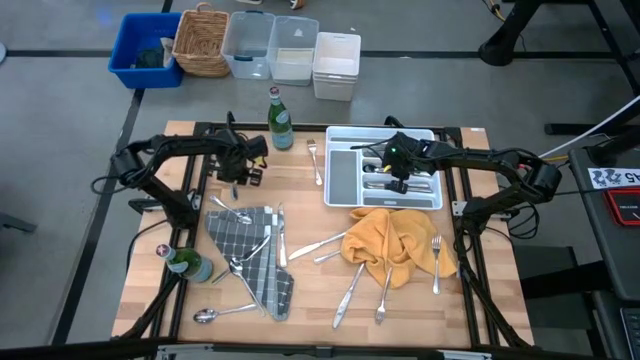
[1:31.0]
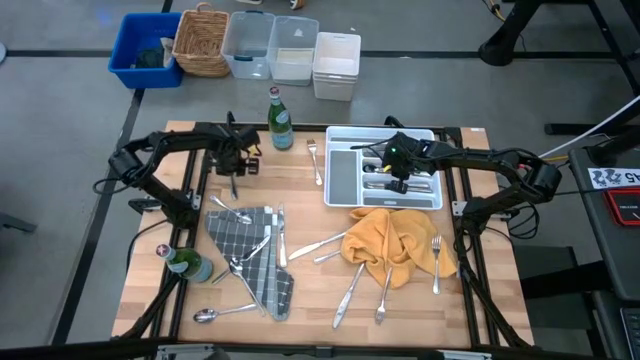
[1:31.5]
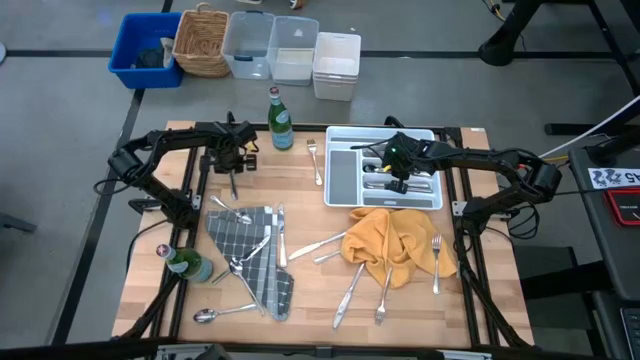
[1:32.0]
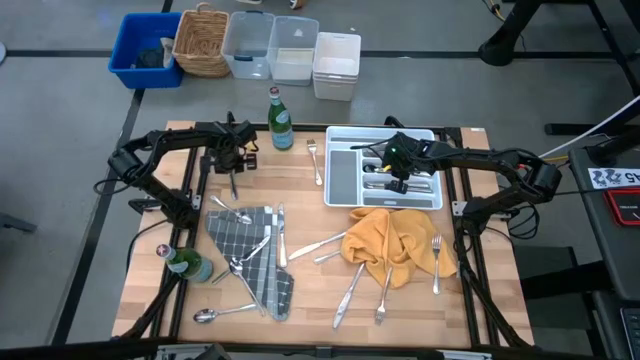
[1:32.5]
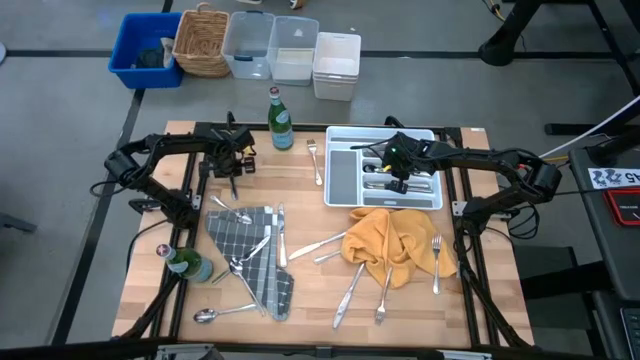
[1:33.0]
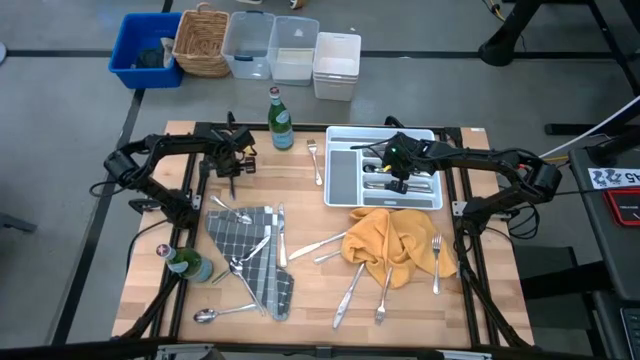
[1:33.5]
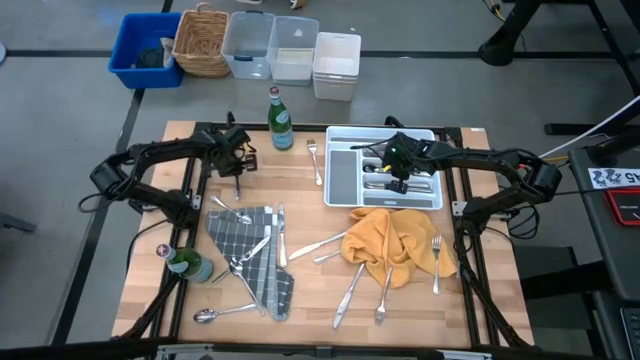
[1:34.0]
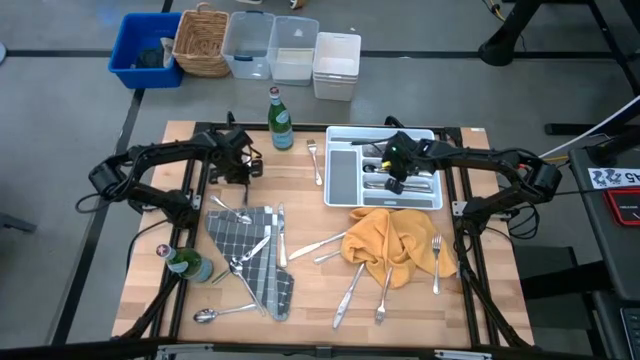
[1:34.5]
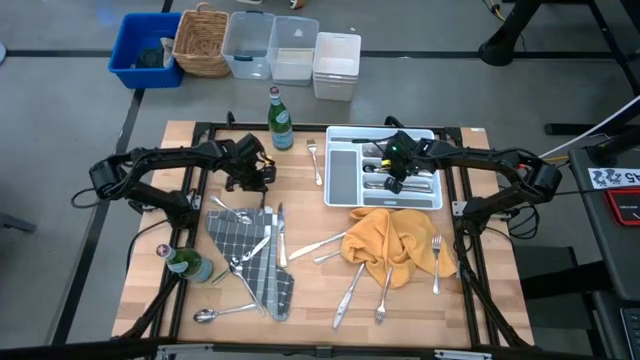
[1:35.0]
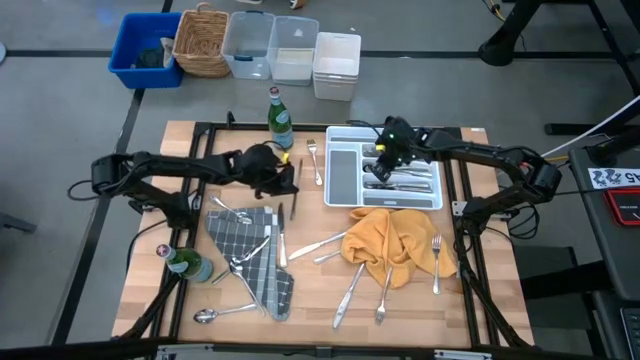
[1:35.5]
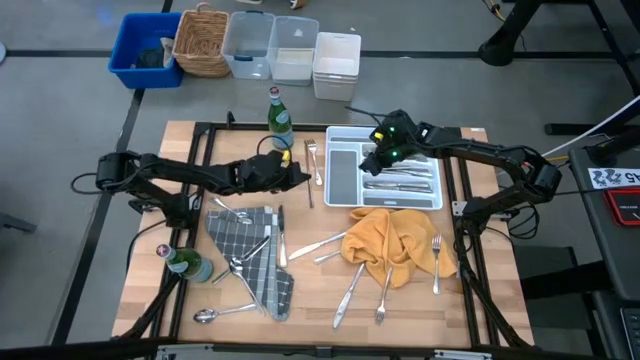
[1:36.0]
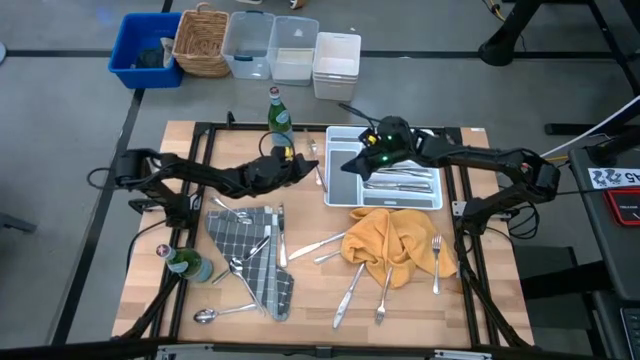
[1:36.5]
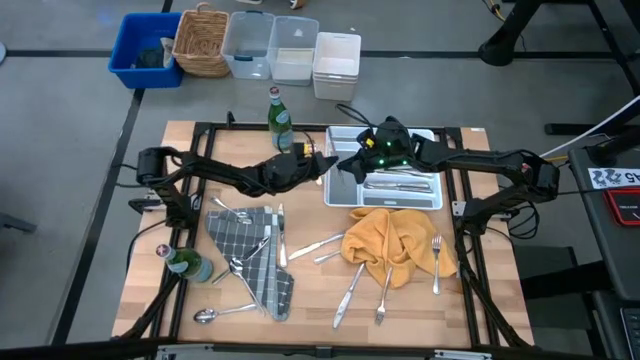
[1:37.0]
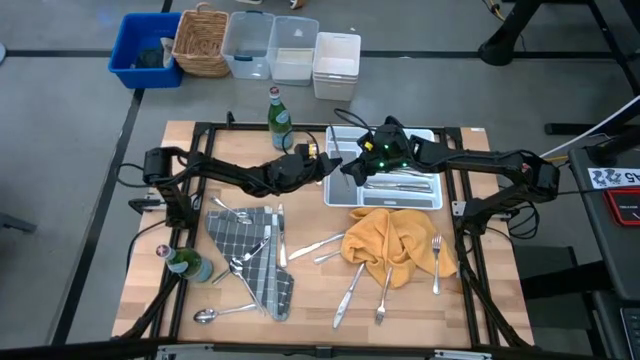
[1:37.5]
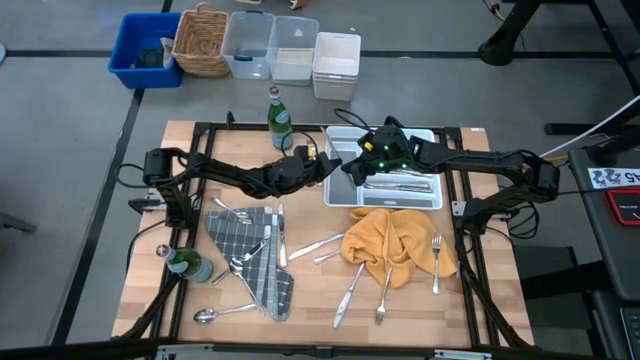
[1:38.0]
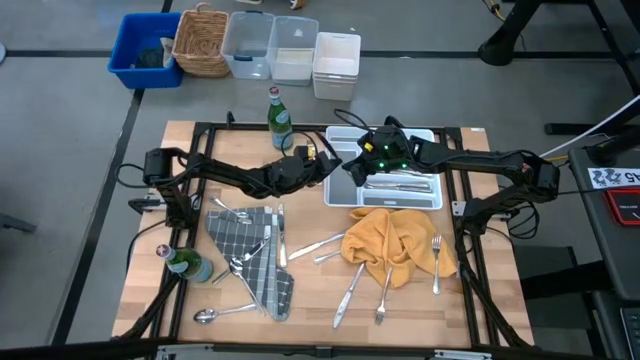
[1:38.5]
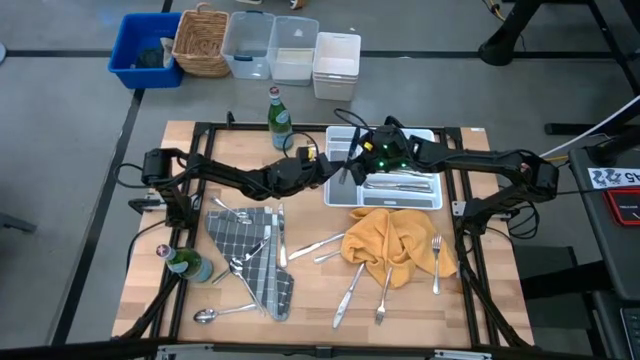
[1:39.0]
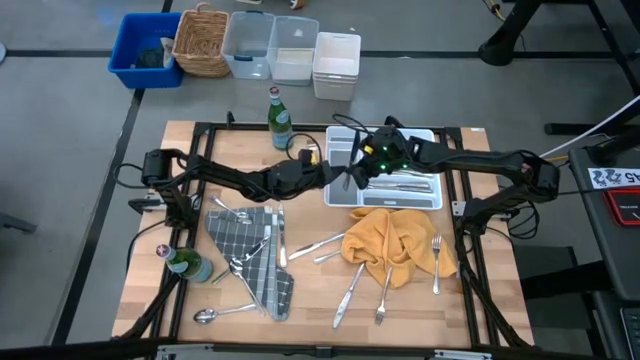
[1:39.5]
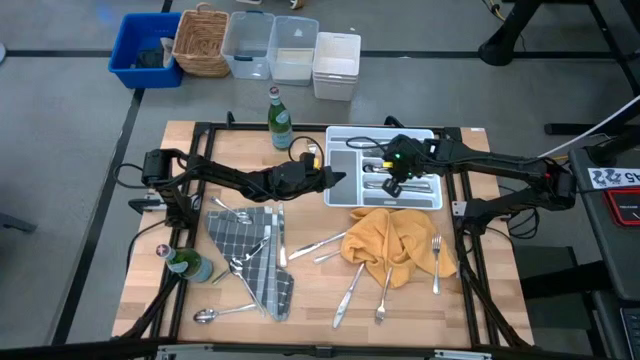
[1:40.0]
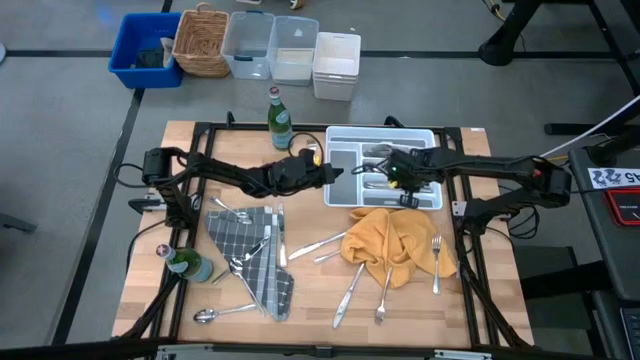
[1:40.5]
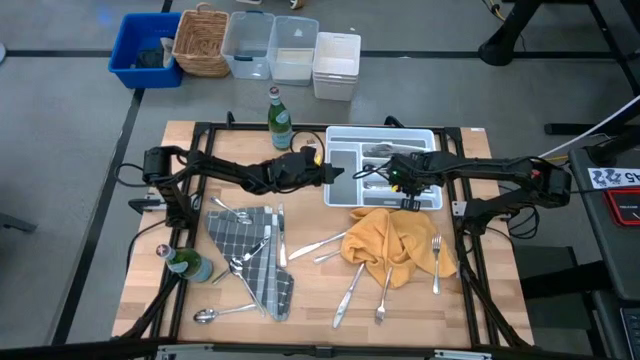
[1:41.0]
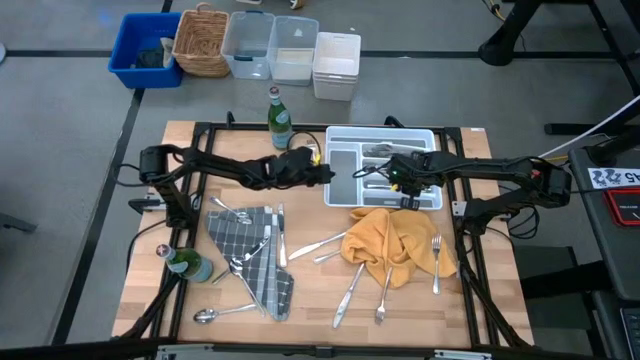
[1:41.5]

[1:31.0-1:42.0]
Put the silver knife into the cutlery tray

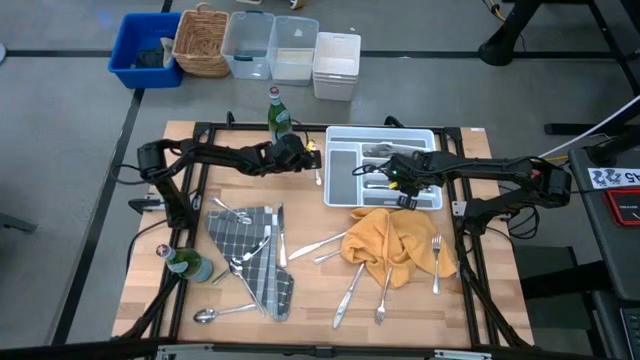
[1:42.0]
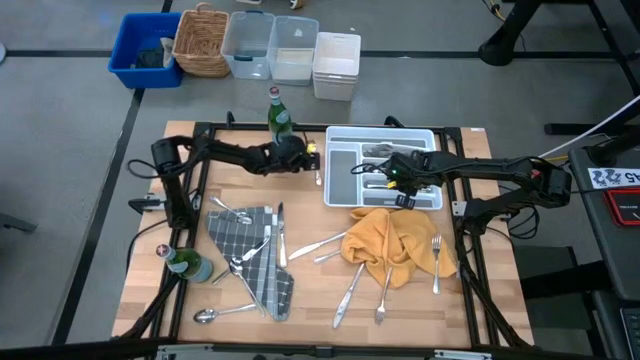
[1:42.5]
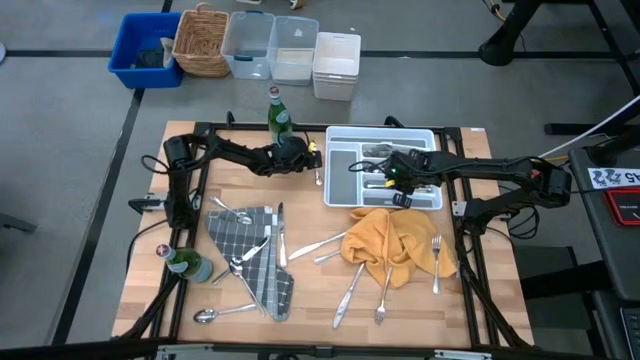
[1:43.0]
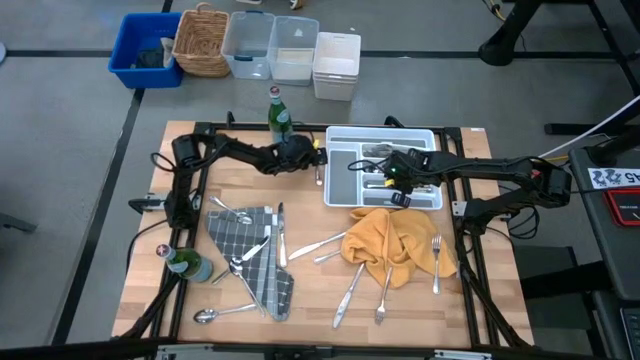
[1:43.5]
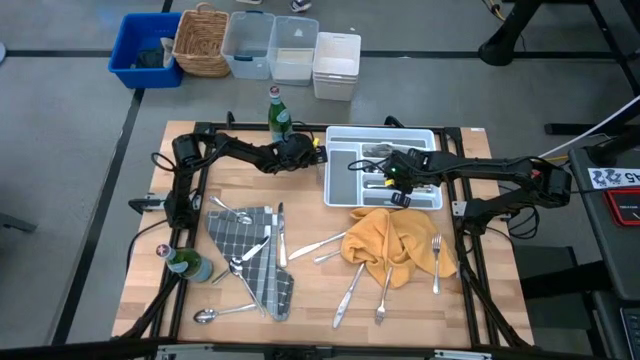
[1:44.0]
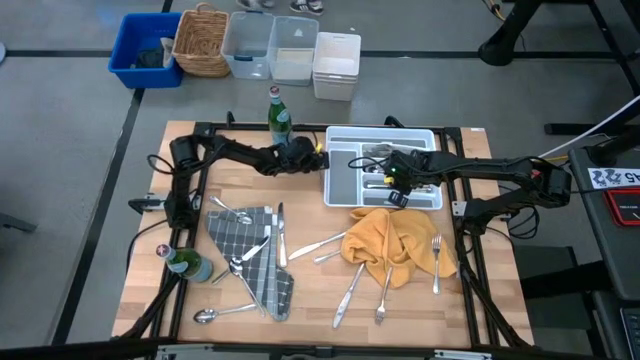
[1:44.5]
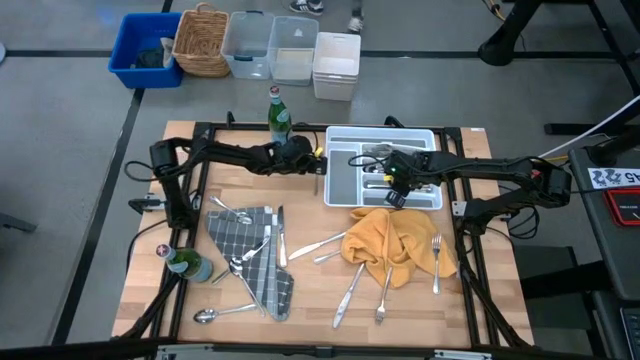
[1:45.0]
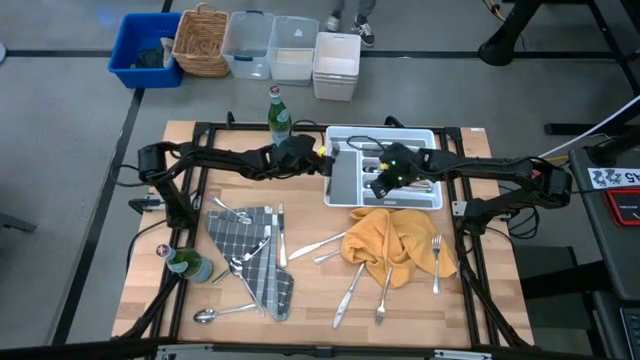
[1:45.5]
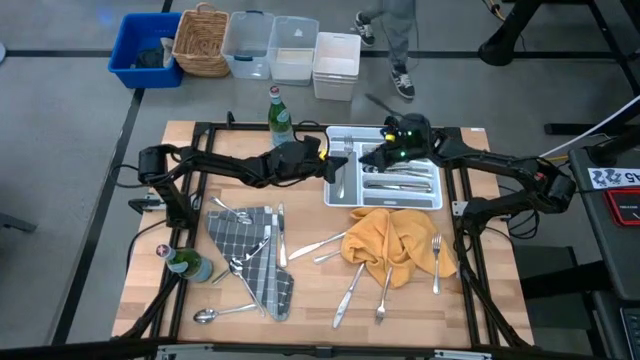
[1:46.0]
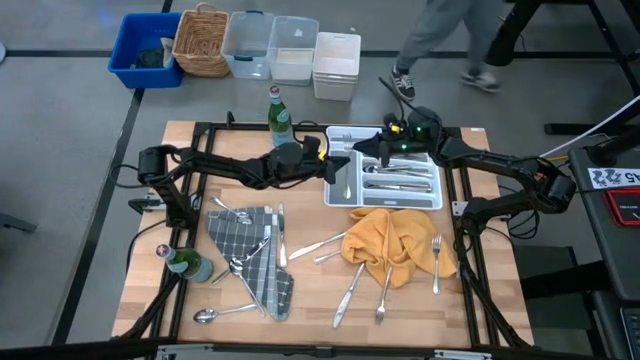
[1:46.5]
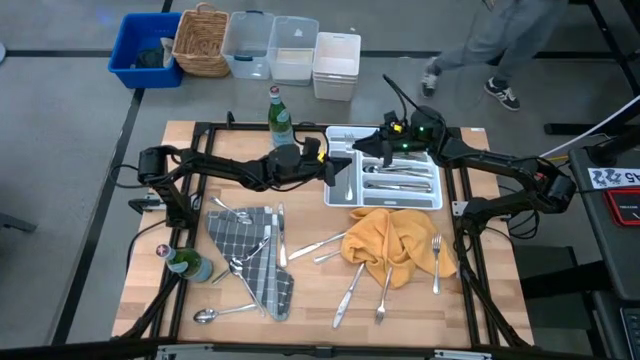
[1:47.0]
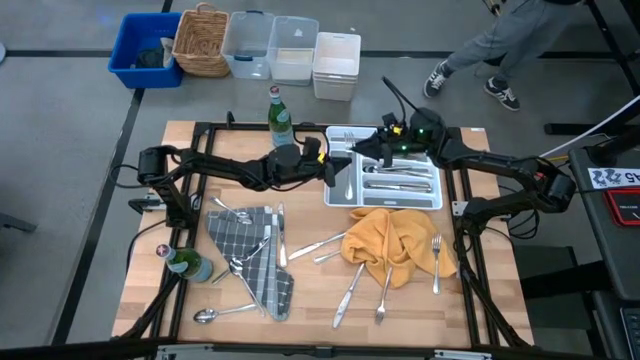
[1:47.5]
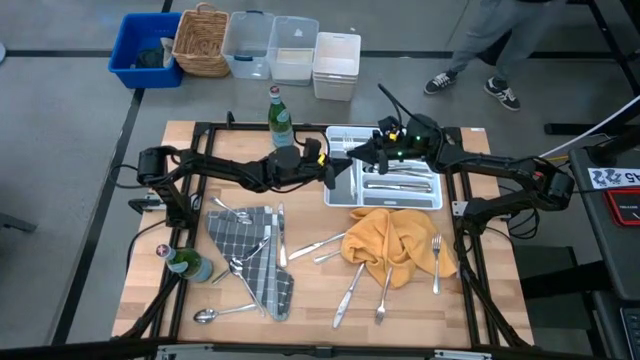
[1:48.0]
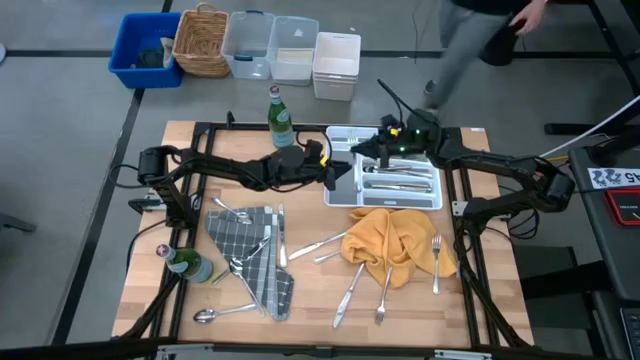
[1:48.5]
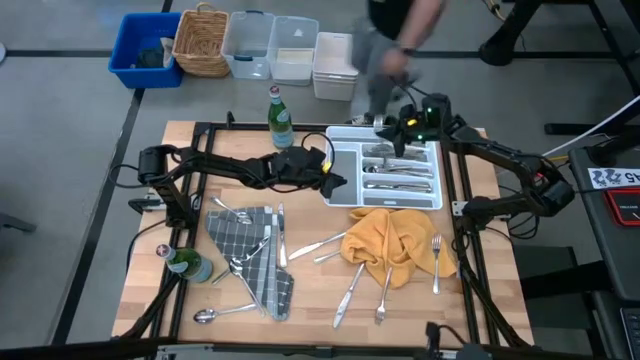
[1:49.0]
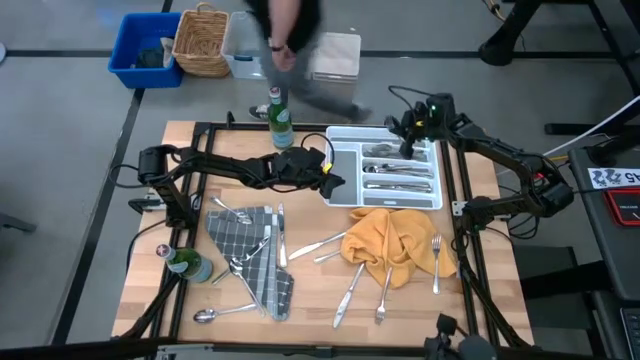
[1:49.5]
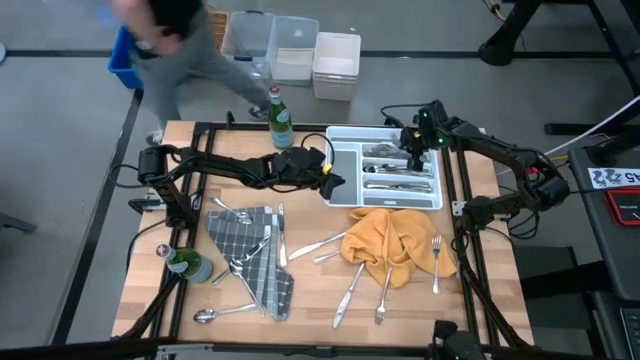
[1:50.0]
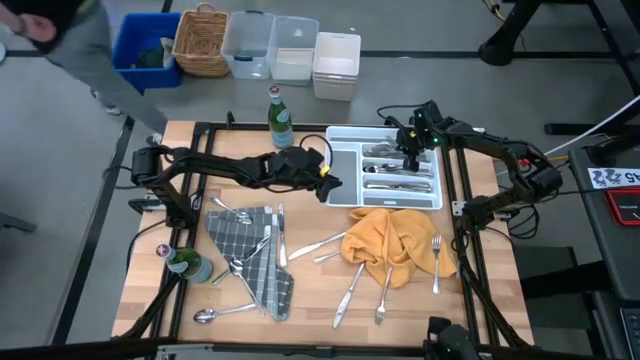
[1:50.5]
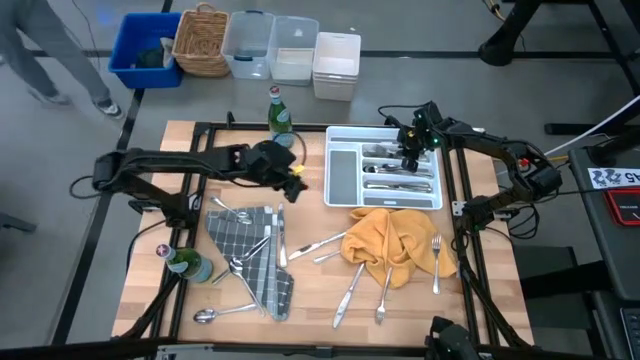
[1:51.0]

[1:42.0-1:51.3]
Put the silver fork into the cutlery tray
